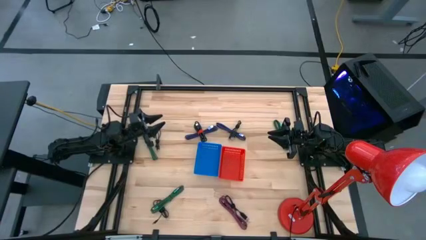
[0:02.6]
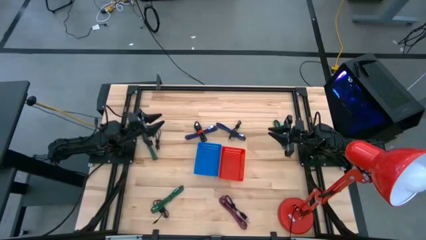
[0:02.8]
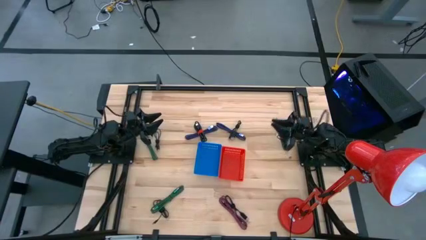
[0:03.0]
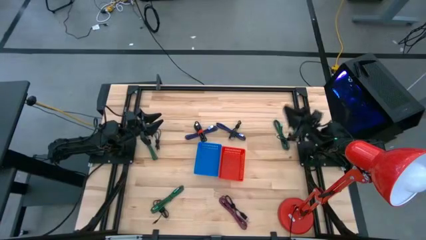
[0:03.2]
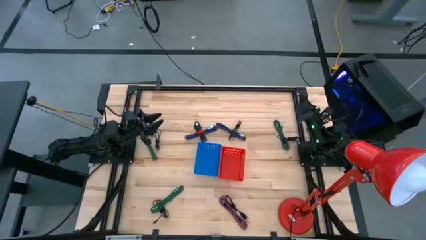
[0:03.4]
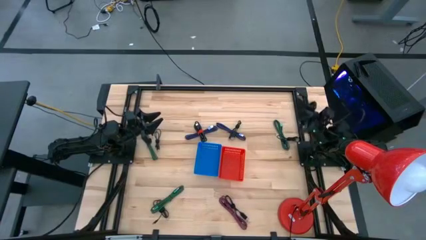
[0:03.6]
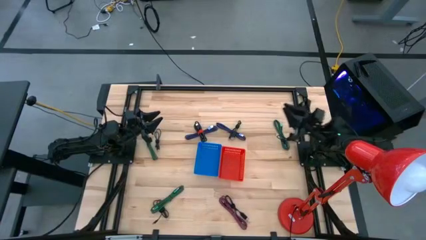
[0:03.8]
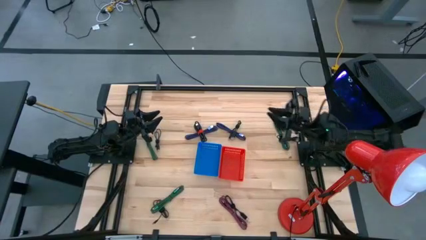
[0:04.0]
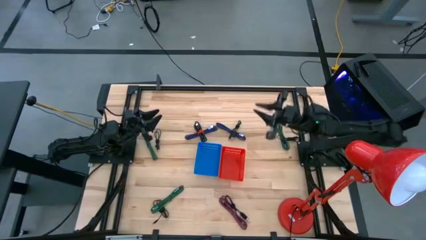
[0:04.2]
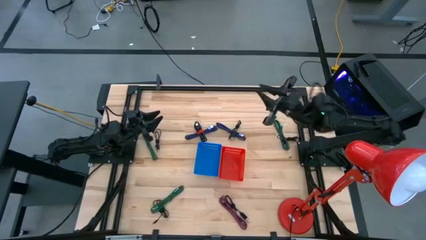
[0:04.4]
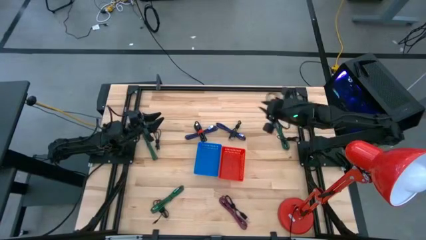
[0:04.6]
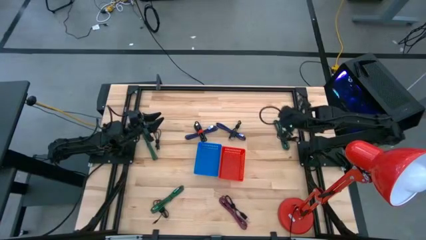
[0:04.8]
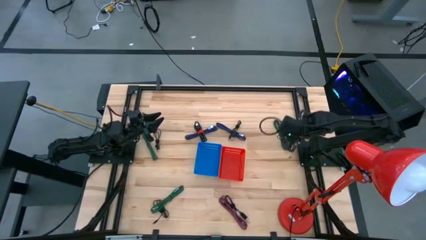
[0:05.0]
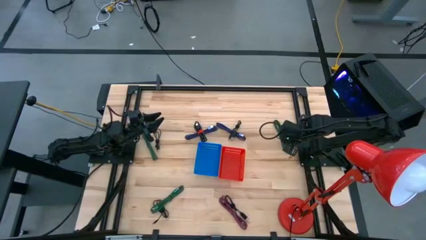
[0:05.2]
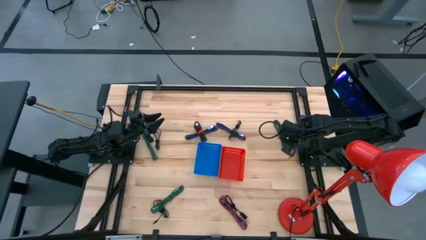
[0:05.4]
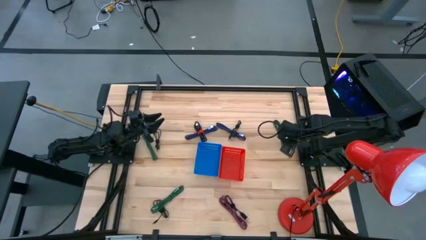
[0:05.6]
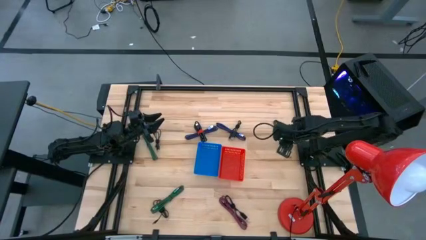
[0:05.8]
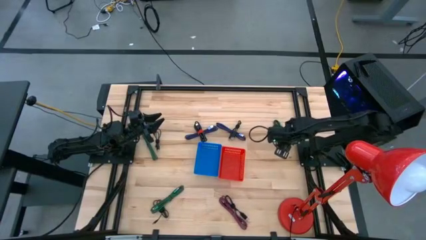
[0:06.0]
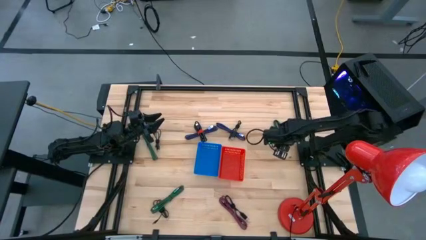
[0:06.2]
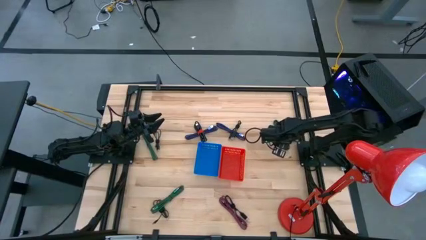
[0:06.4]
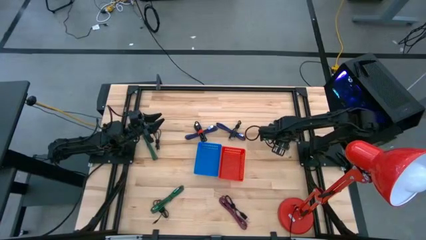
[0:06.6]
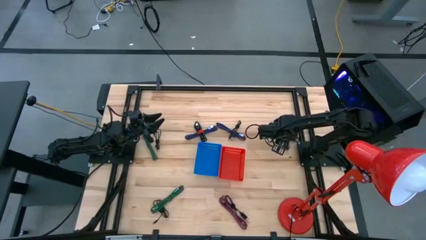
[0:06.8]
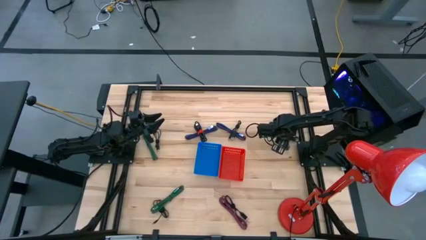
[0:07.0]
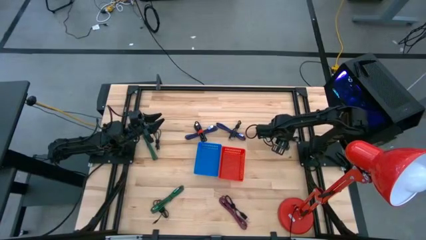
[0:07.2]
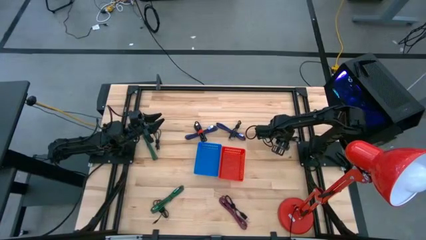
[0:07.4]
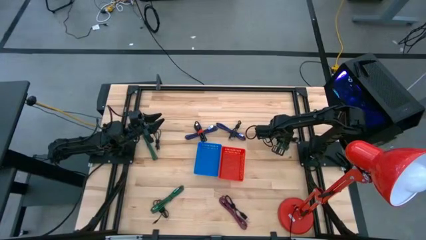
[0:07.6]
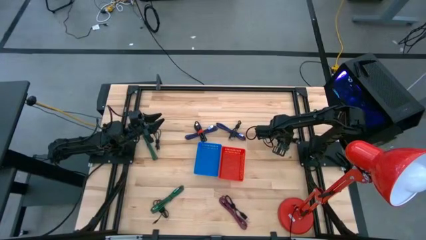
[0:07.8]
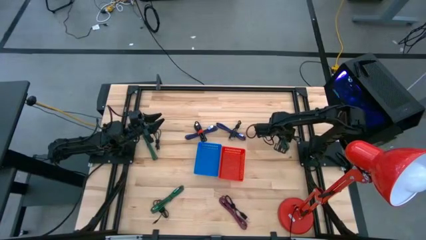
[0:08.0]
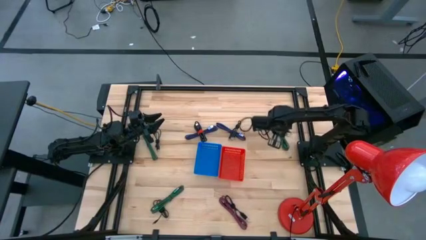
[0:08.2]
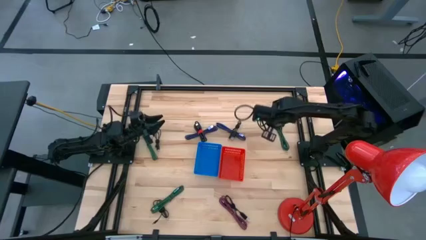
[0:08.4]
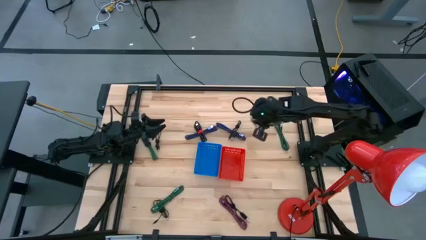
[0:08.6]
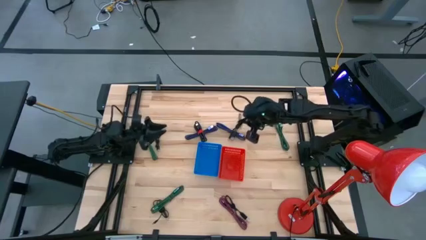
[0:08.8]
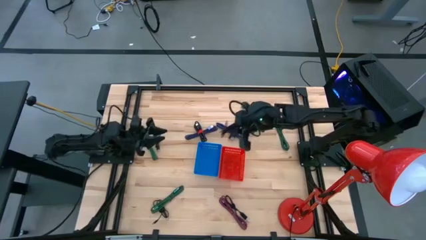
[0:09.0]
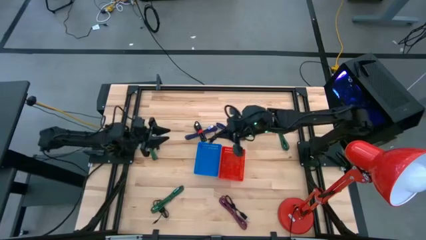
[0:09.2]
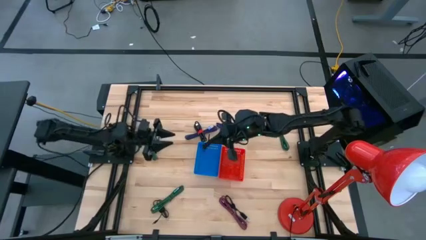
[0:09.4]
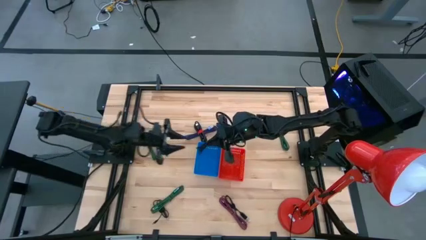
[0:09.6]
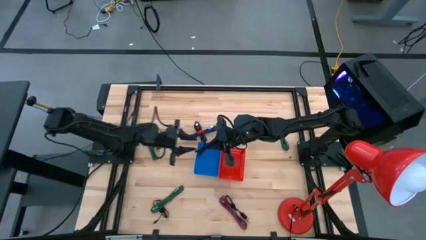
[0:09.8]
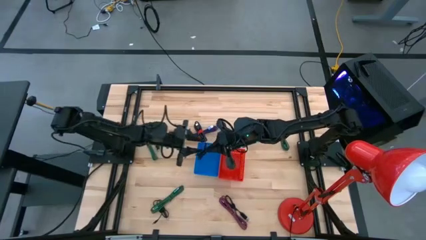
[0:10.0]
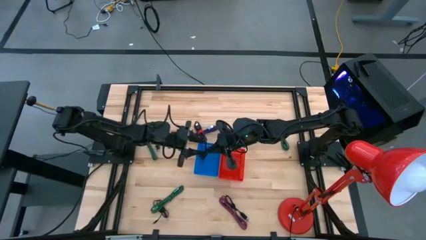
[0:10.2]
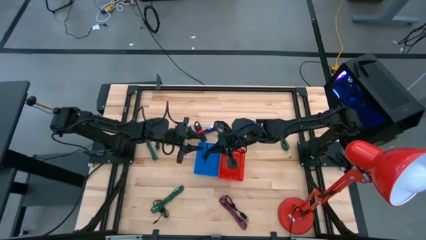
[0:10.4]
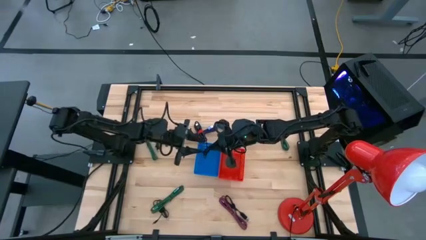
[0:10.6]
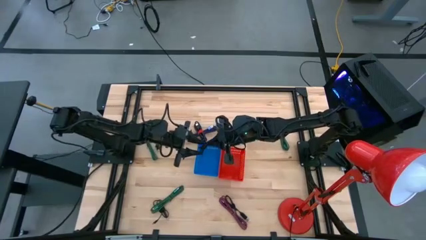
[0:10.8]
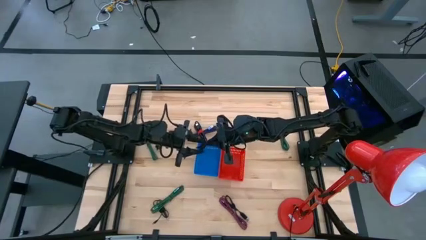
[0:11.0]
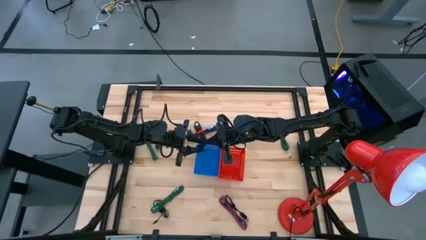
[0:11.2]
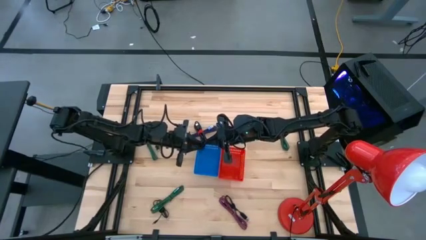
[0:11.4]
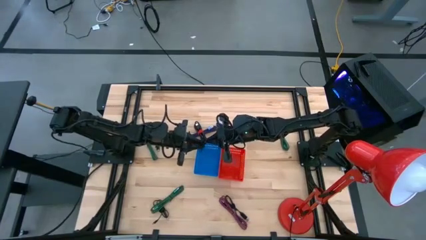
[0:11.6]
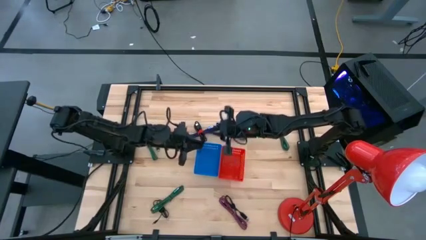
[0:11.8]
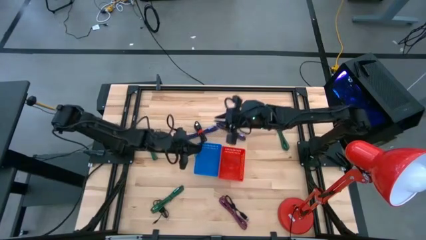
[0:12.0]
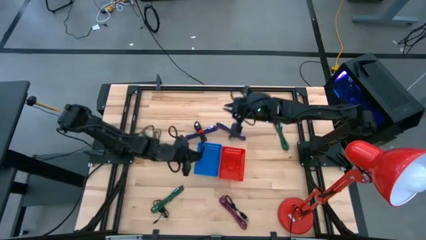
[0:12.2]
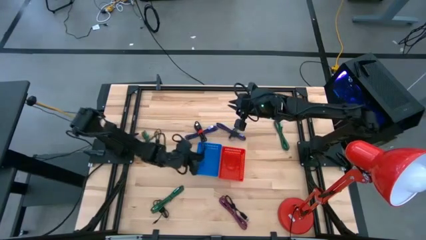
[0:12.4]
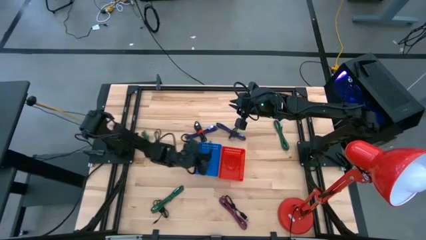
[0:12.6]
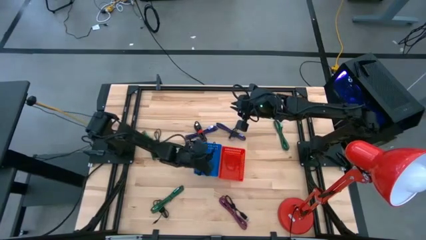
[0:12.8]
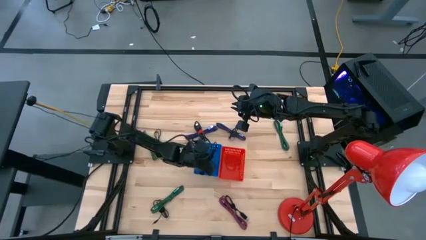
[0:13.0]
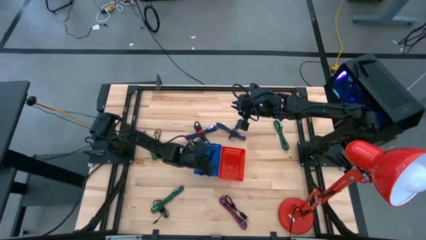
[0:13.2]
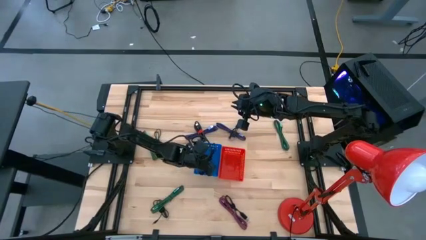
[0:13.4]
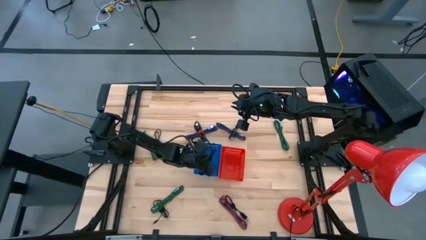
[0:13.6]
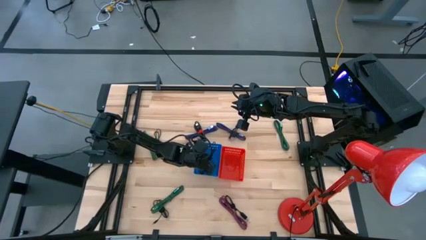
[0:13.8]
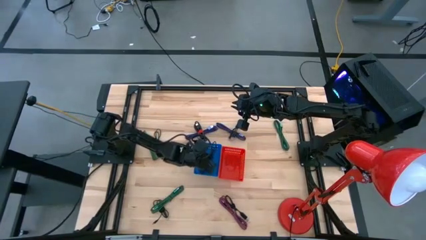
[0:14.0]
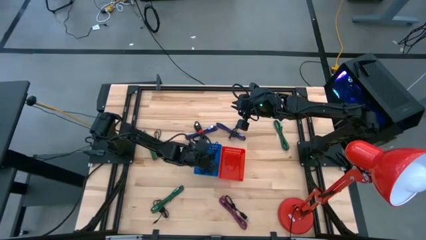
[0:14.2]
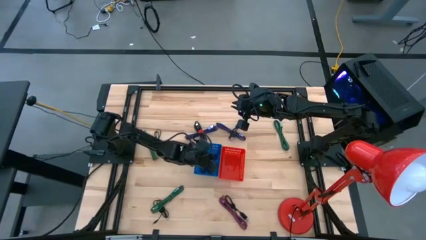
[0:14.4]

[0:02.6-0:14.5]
Task: Pick & Place USB Port
Put the black USB cable into the blue basket

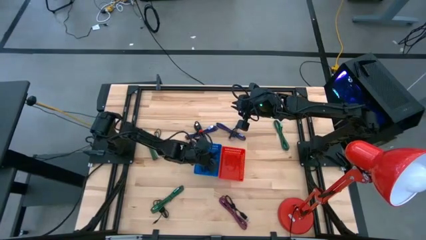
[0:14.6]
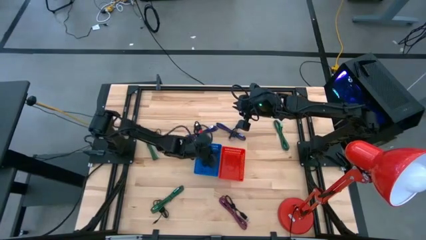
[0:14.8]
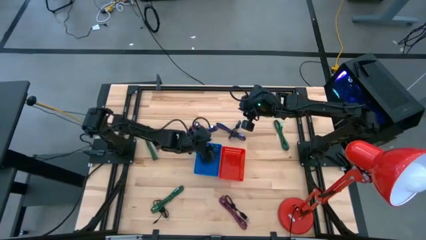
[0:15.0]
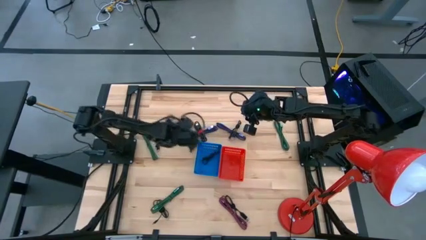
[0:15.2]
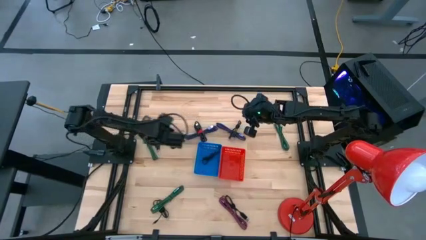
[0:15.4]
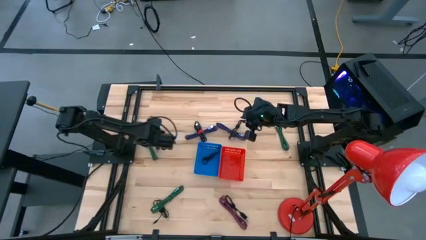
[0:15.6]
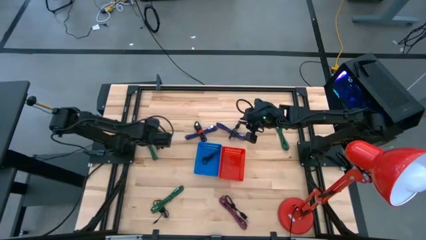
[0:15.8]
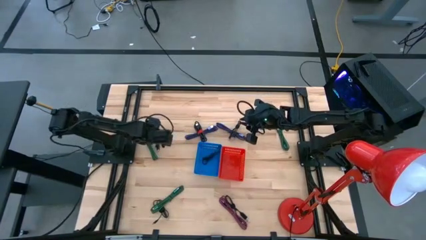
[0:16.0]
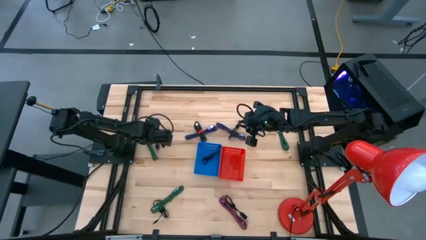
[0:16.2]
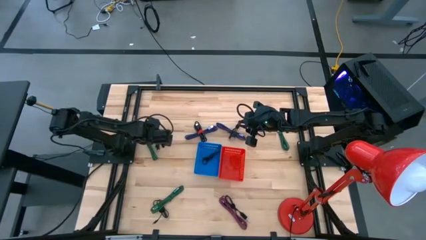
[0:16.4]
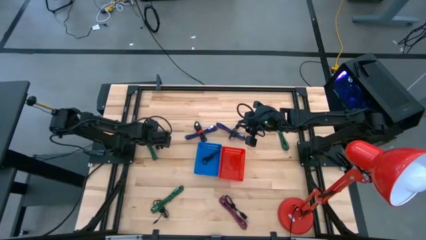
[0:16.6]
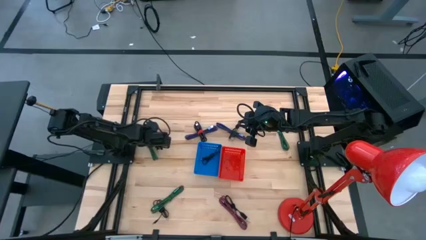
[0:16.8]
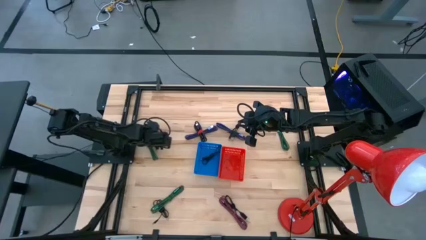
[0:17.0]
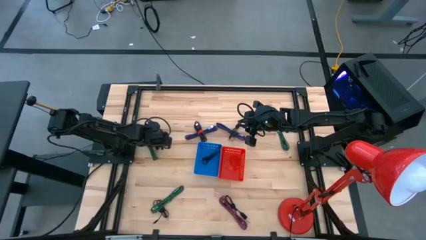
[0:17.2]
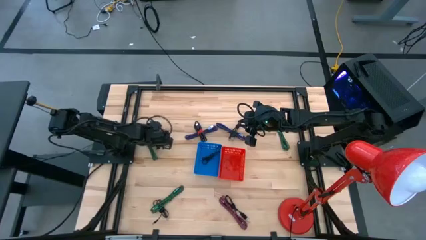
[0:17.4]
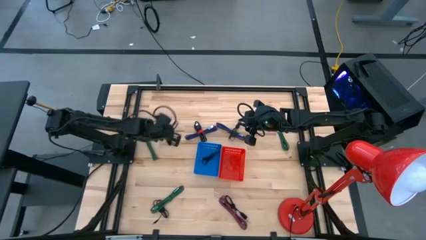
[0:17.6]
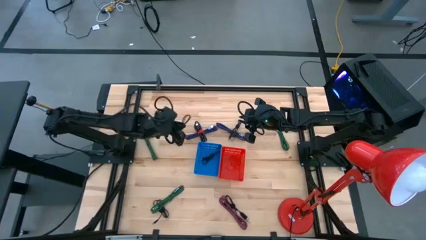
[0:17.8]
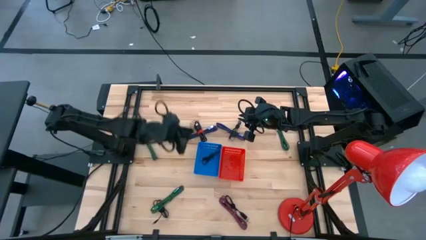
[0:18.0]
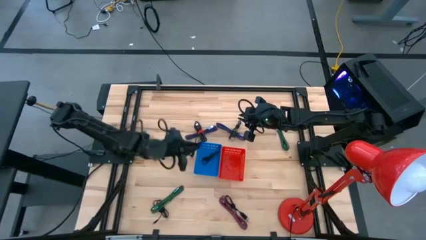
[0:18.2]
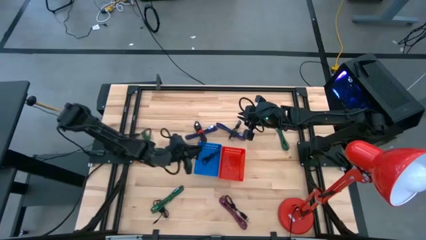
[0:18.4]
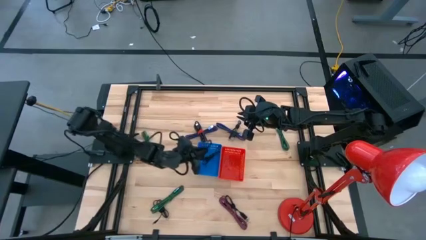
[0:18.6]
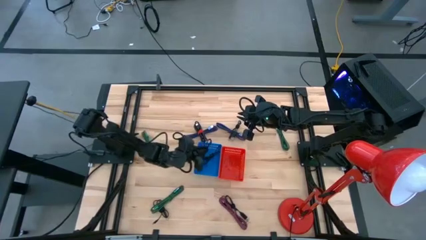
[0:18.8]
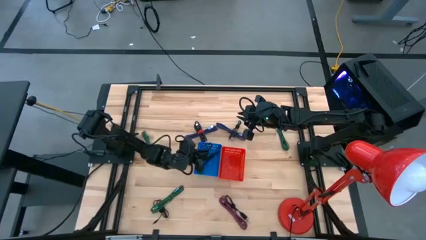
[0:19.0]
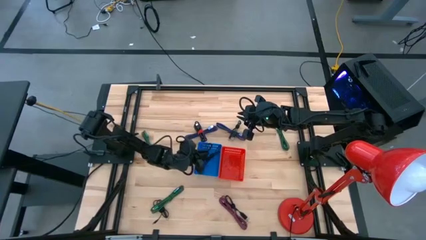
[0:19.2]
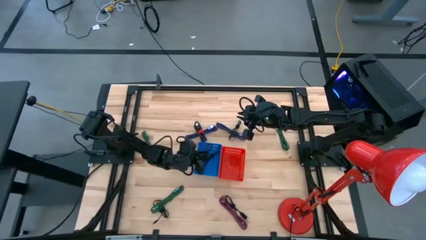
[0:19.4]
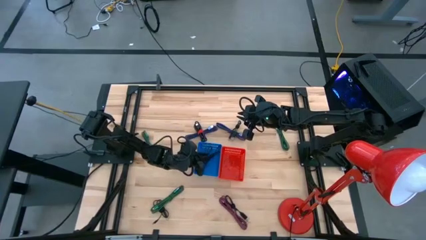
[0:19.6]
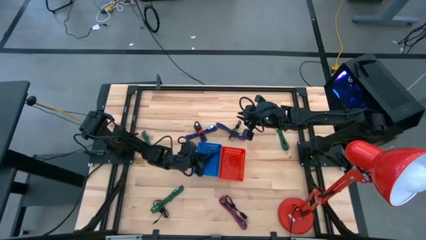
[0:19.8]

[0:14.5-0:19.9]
Put the black USB cable into the blue basket
